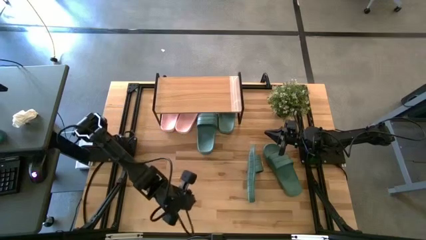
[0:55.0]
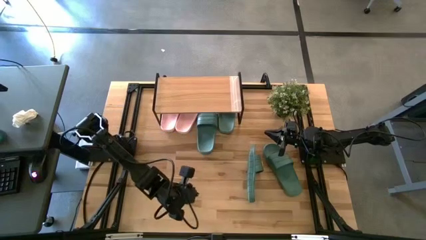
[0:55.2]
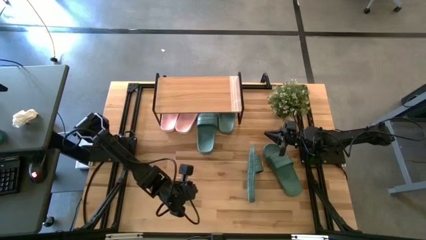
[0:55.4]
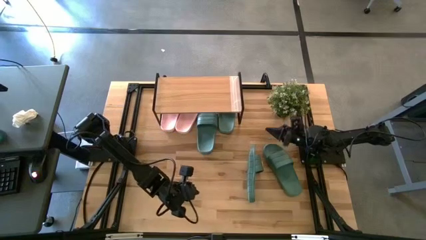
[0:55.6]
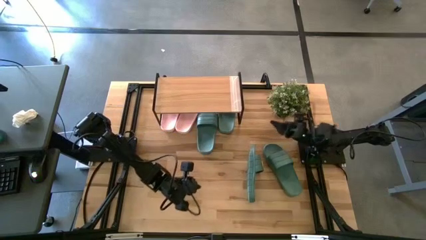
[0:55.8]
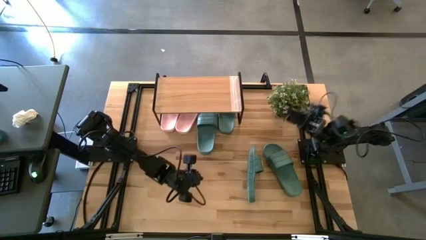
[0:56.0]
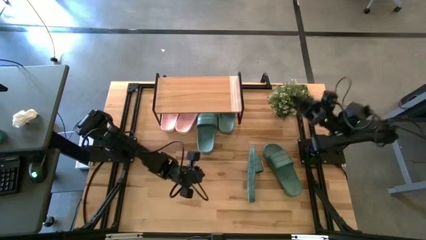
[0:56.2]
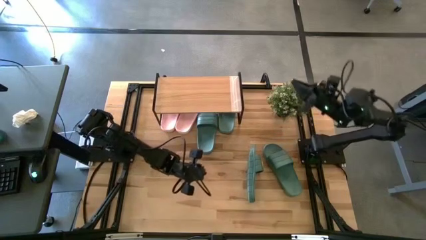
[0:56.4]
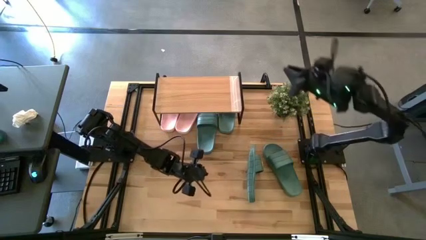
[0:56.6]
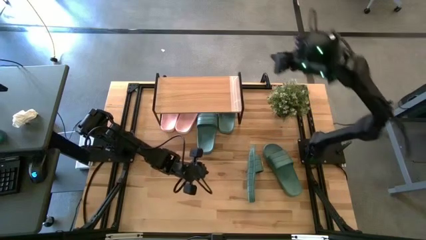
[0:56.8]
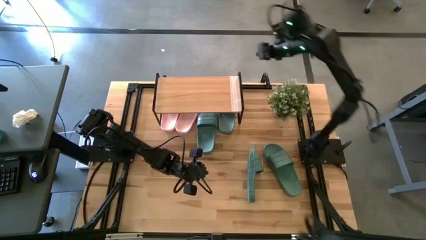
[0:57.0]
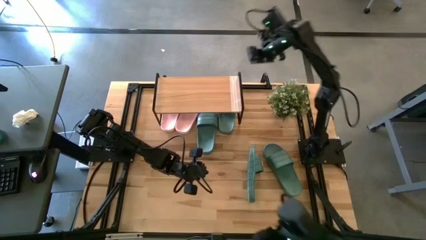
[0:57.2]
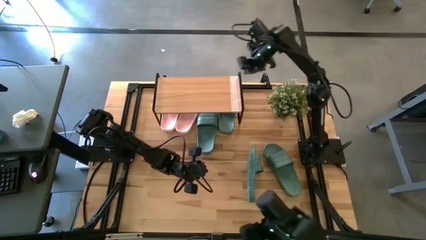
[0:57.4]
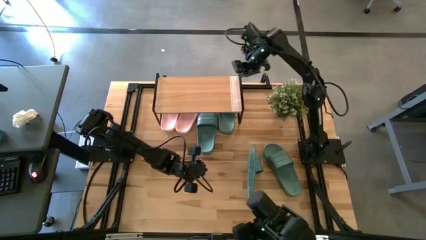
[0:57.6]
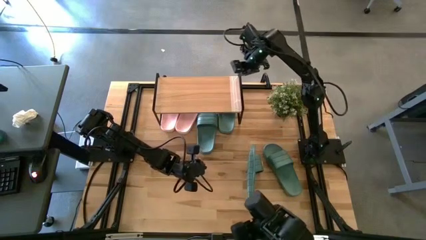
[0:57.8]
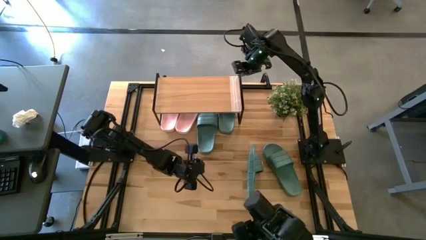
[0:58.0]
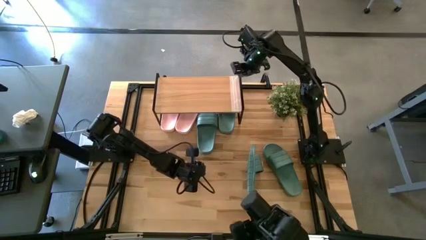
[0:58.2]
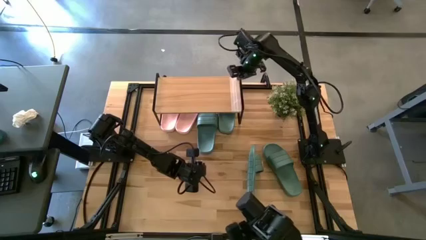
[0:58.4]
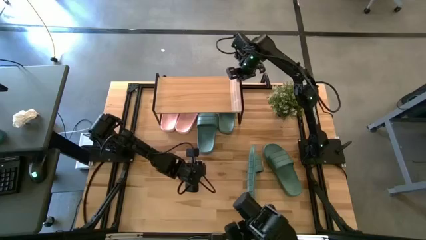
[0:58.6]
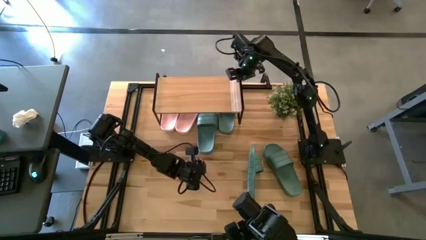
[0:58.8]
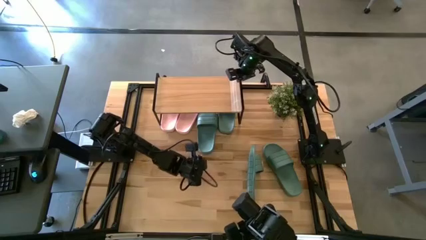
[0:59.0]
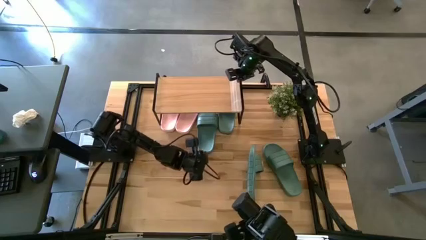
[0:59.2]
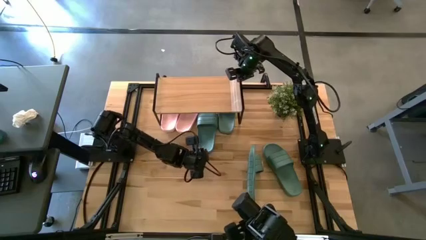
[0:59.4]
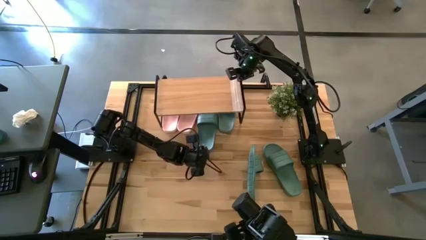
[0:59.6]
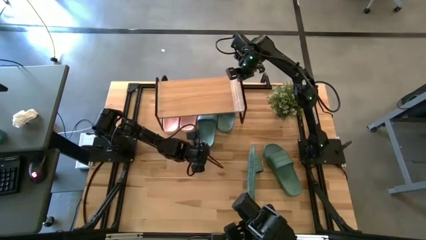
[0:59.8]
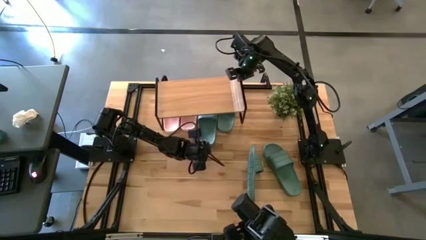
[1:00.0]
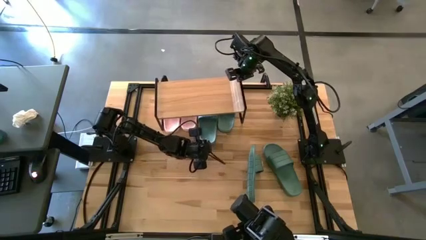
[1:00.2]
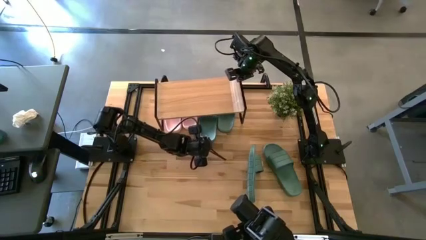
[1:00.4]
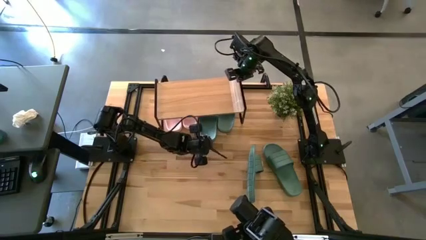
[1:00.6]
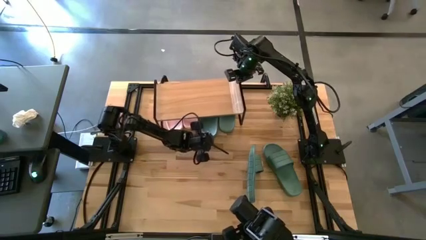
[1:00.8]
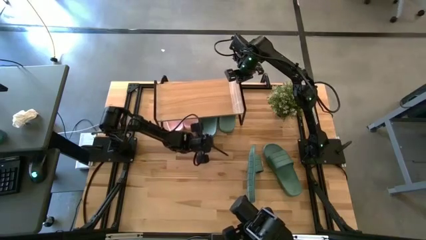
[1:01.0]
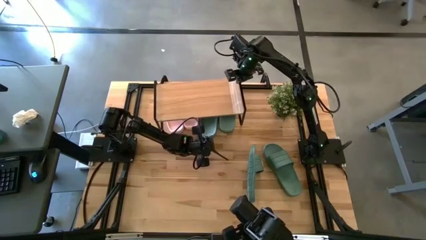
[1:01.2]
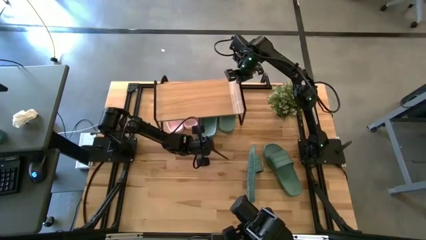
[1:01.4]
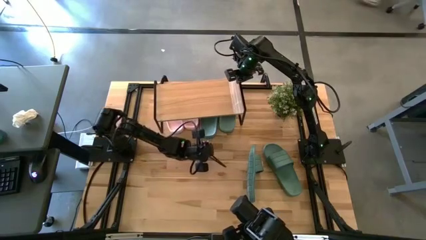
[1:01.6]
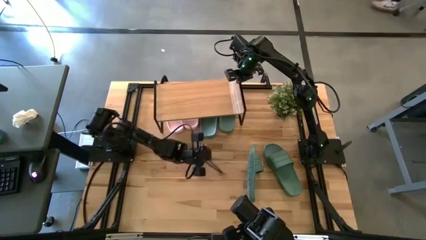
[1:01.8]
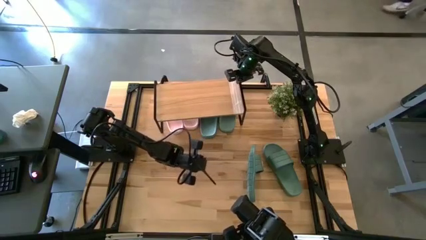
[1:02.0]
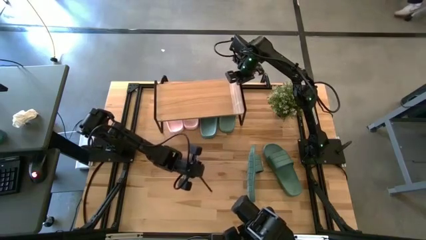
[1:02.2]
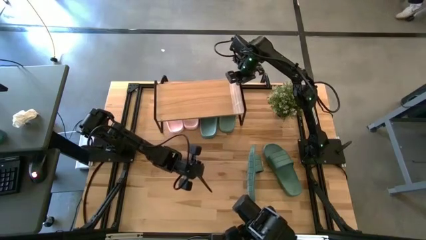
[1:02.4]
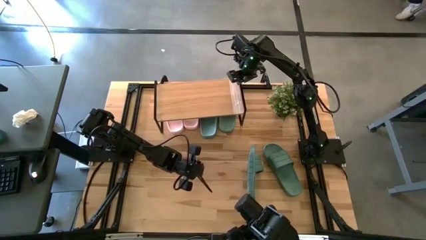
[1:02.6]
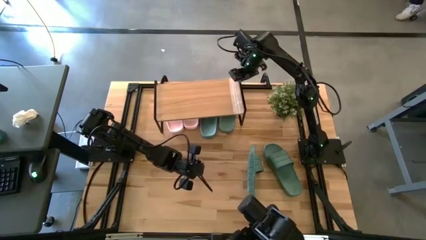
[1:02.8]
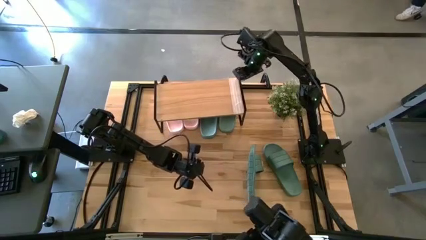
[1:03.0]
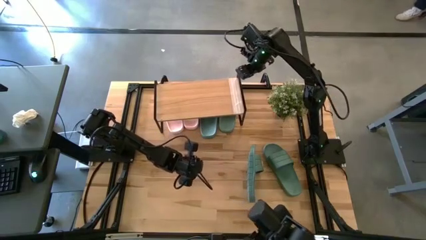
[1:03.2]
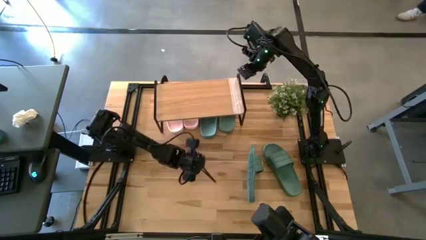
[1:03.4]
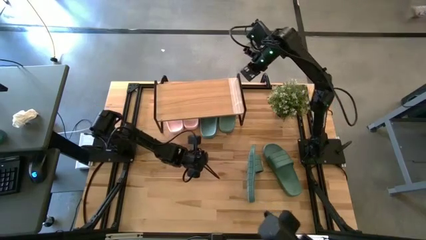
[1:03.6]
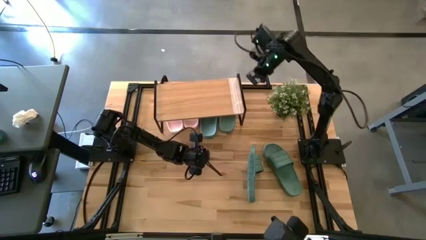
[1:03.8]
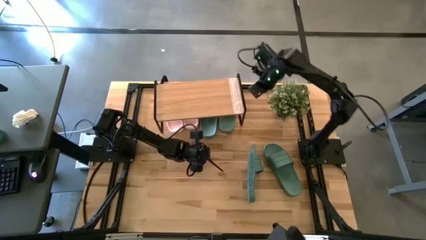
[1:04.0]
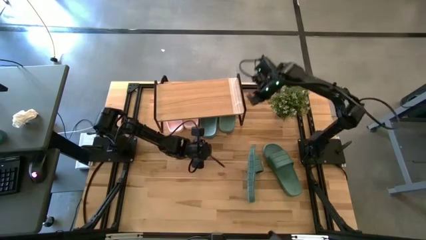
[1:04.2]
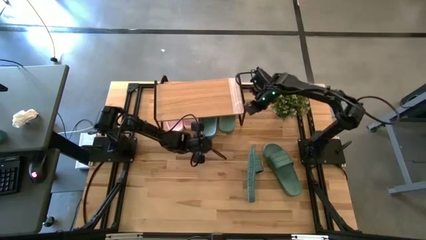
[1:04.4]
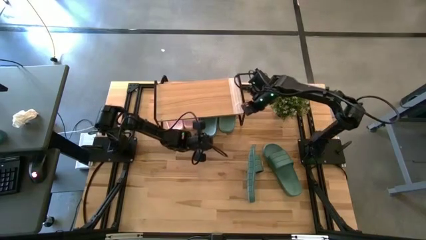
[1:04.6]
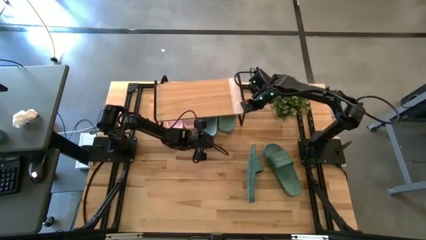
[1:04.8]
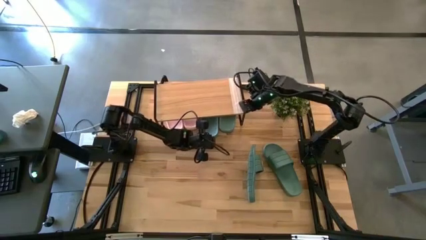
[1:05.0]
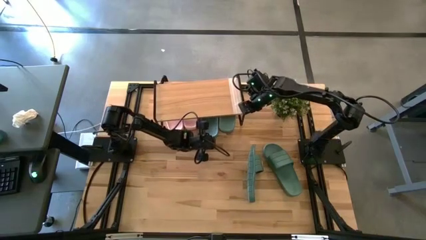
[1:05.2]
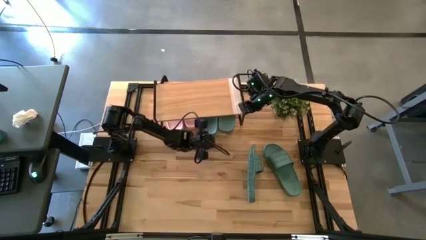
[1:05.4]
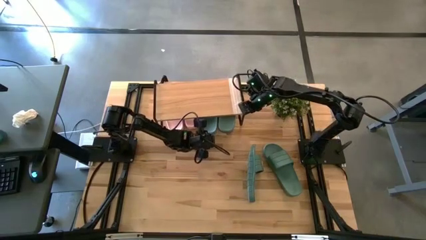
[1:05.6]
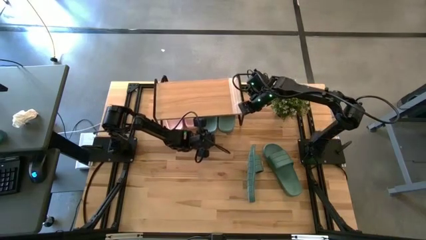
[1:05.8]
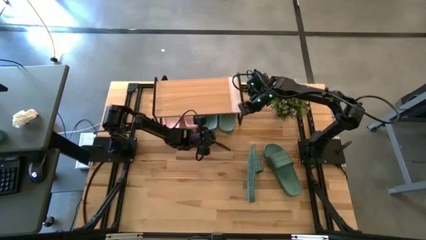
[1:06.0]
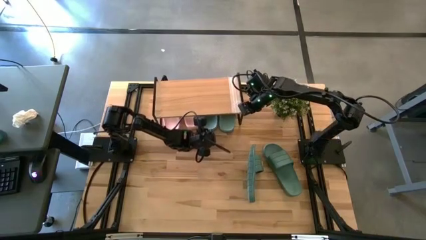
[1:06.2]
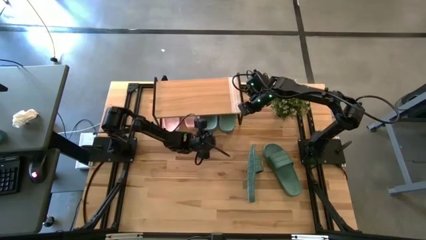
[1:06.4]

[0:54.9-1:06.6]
Task: Pick and place slides into the shelf
Put the left blue slipper on the bottom shelf

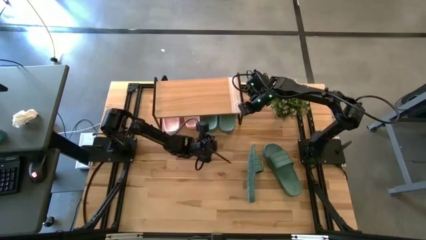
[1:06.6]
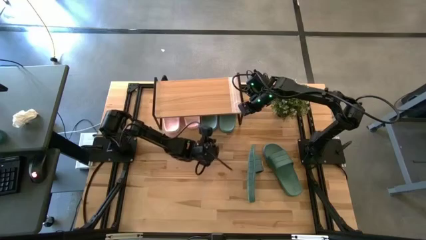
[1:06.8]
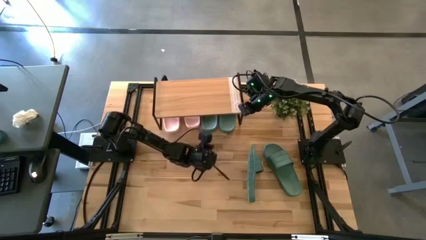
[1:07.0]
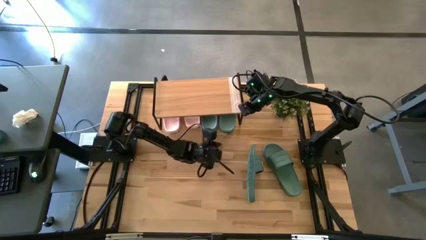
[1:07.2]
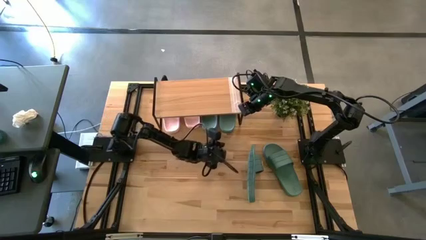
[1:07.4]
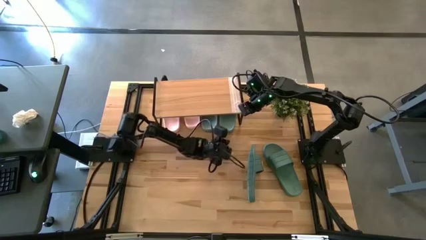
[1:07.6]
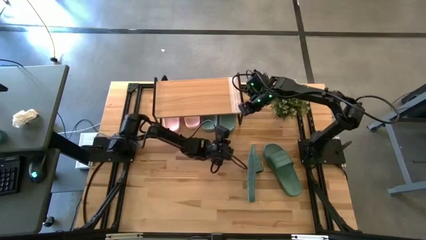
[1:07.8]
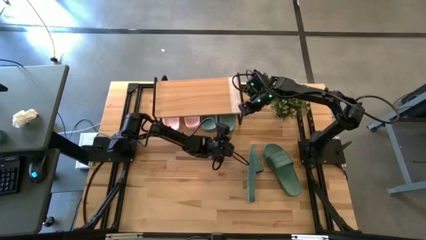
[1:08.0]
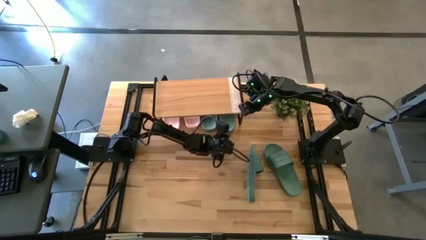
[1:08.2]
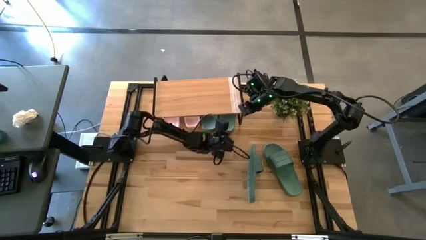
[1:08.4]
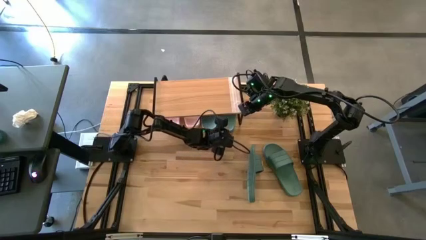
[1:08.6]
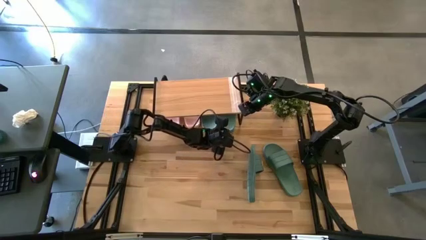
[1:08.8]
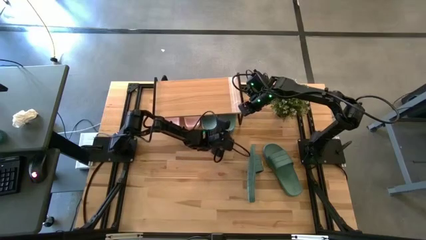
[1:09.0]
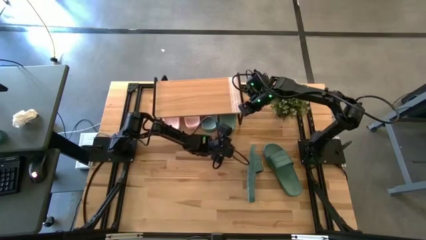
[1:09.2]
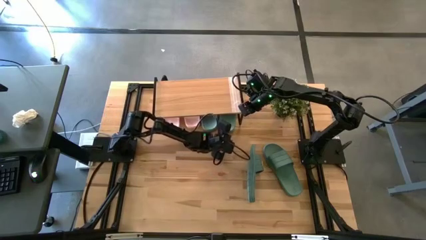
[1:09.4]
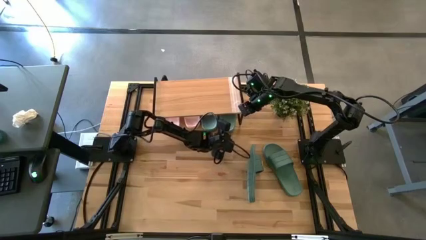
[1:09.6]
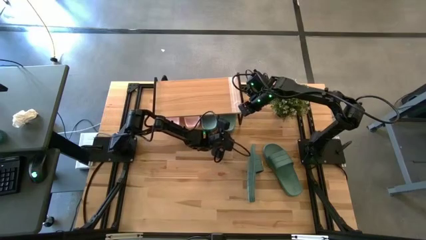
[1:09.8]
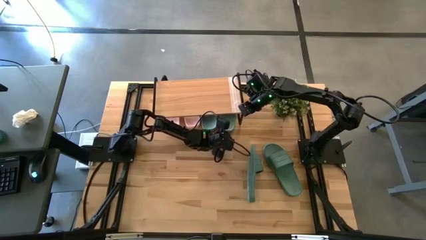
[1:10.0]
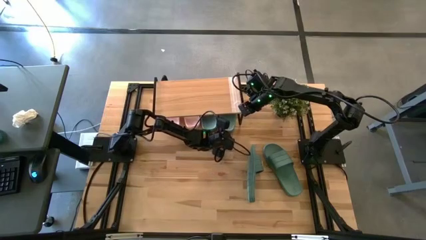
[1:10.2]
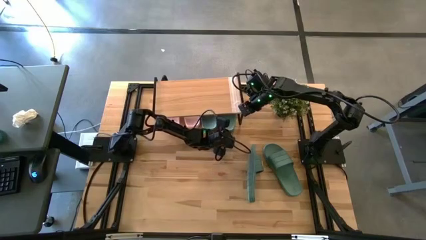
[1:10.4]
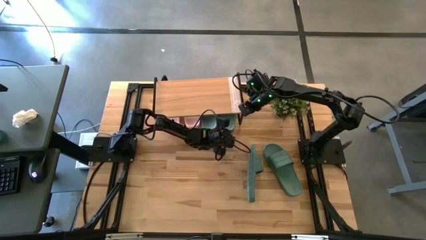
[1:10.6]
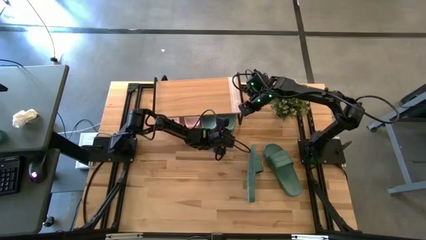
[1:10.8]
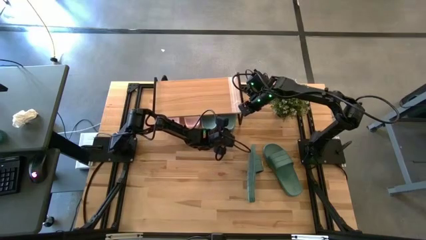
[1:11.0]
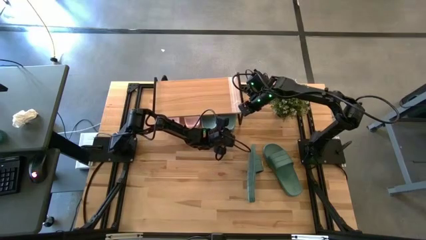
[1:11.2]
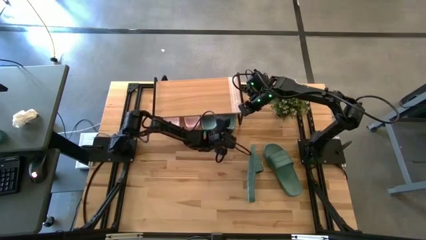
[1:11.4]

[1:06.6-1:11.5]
Adjust the right pink slipper on the bottom shelf
